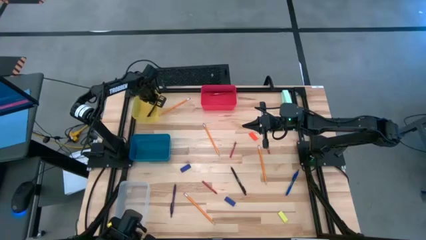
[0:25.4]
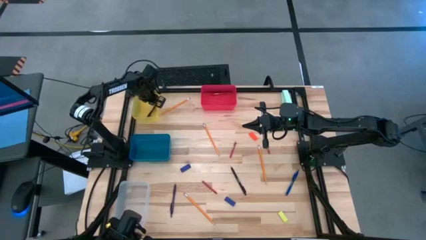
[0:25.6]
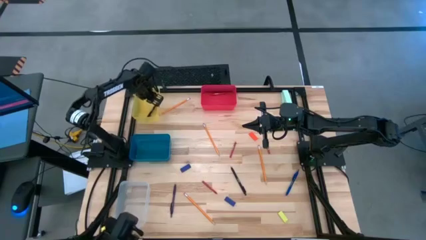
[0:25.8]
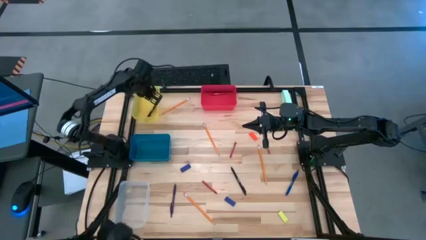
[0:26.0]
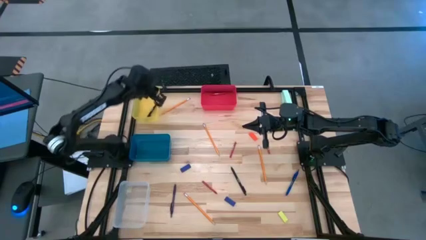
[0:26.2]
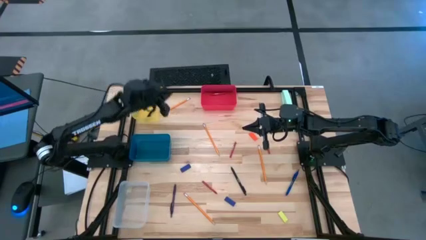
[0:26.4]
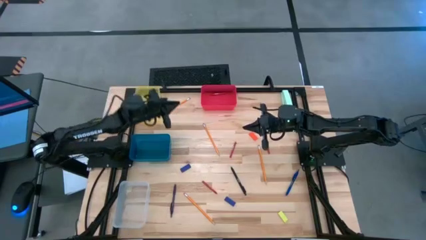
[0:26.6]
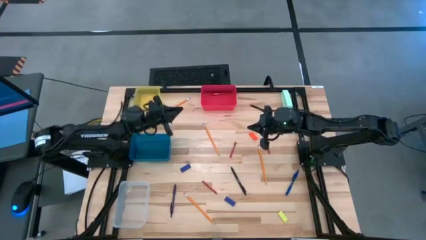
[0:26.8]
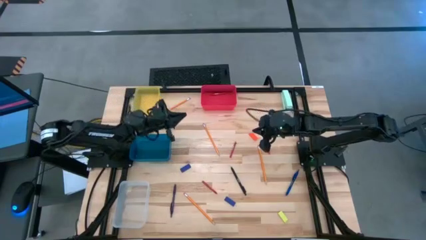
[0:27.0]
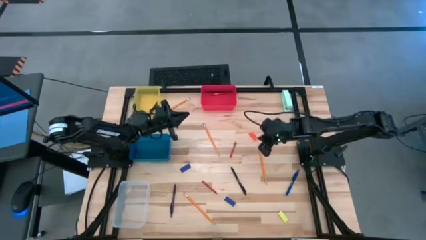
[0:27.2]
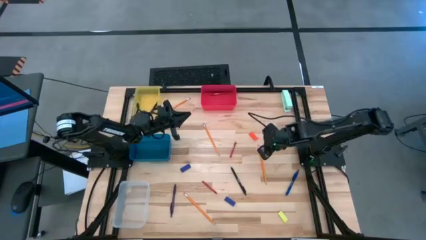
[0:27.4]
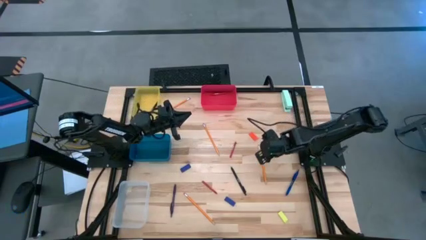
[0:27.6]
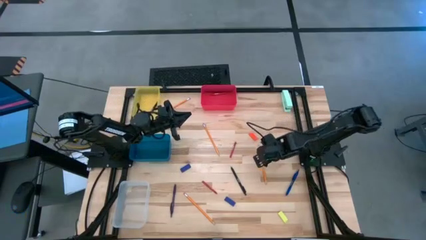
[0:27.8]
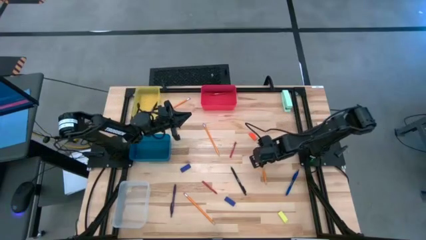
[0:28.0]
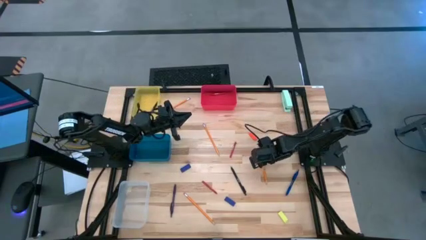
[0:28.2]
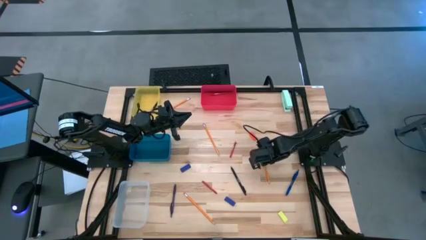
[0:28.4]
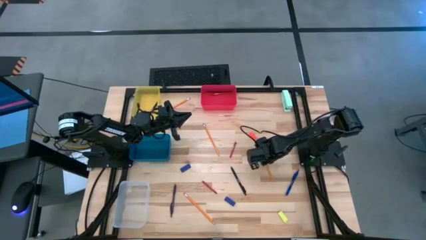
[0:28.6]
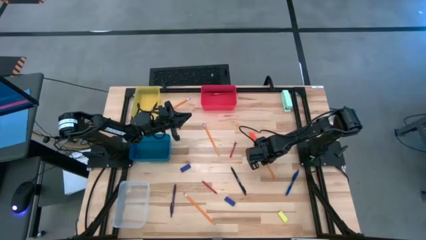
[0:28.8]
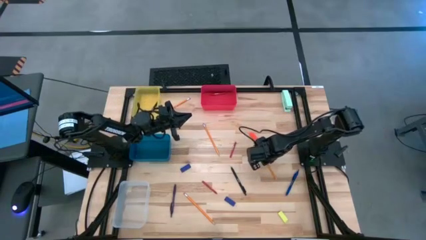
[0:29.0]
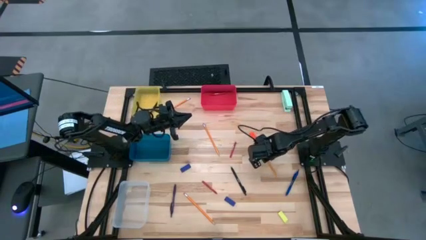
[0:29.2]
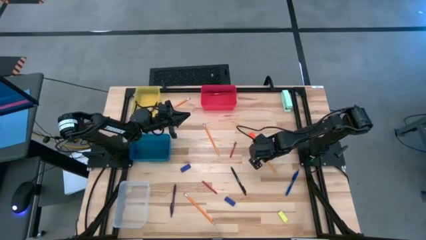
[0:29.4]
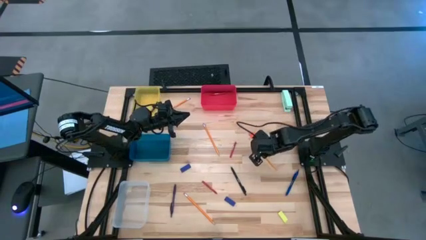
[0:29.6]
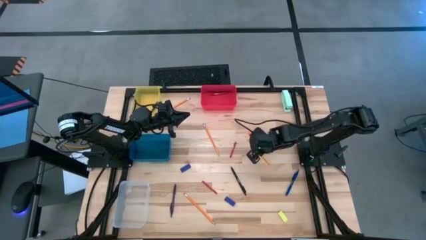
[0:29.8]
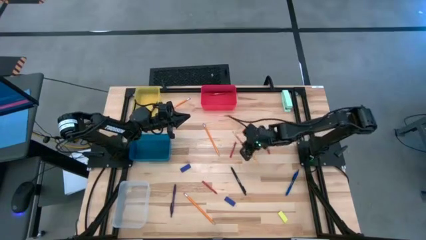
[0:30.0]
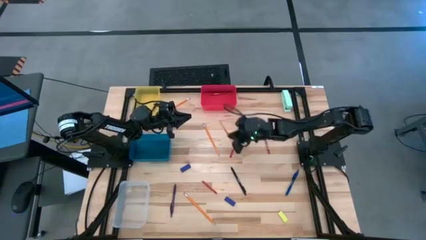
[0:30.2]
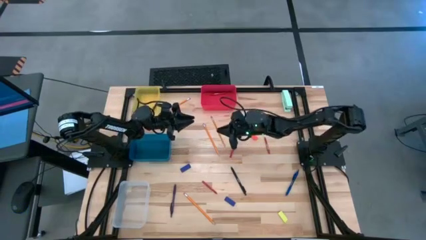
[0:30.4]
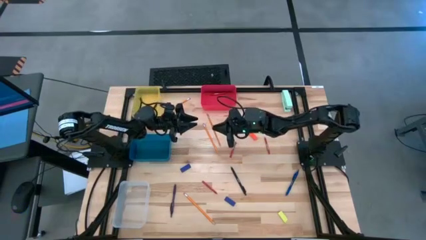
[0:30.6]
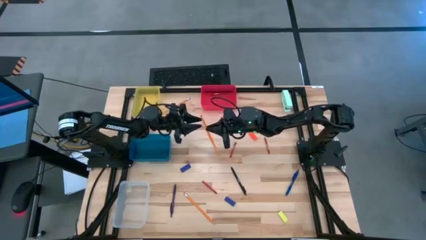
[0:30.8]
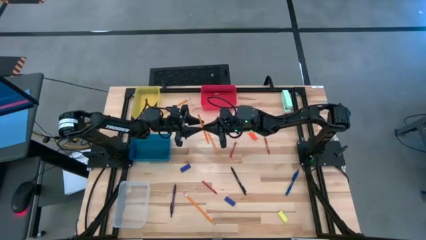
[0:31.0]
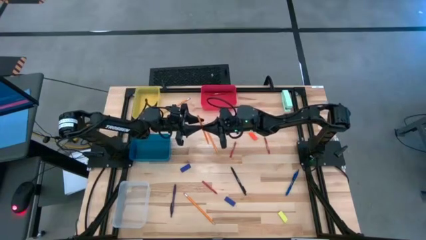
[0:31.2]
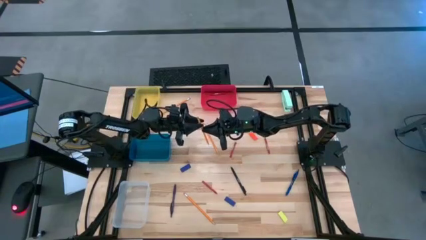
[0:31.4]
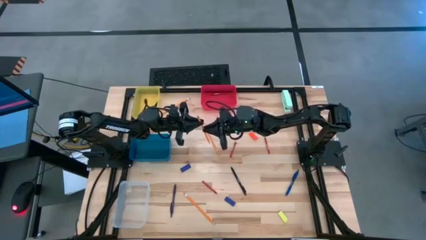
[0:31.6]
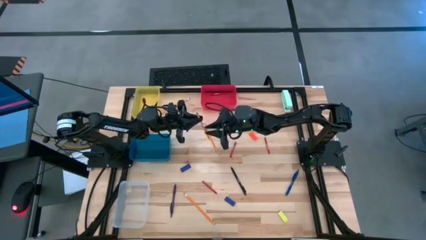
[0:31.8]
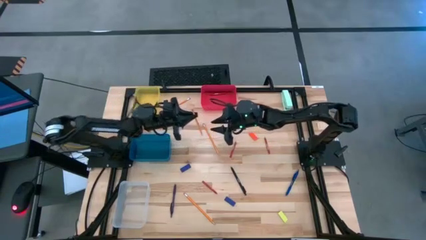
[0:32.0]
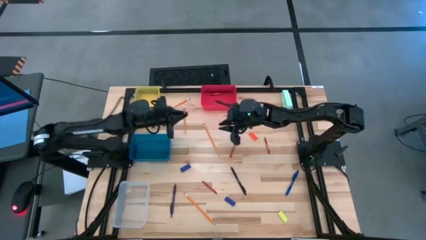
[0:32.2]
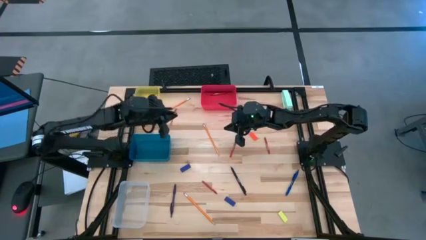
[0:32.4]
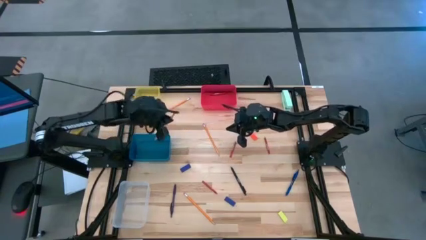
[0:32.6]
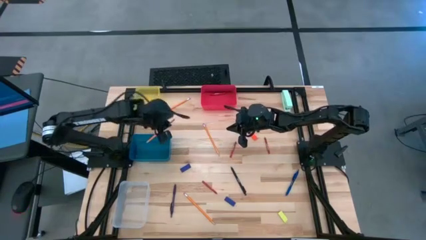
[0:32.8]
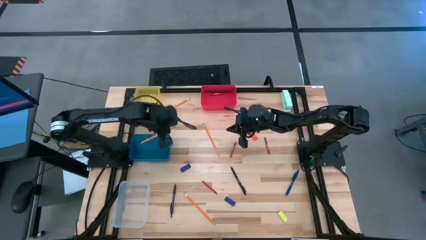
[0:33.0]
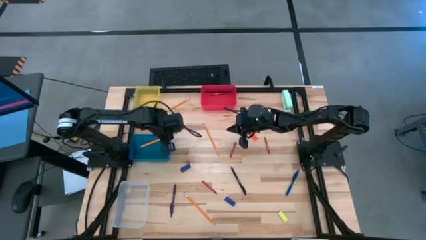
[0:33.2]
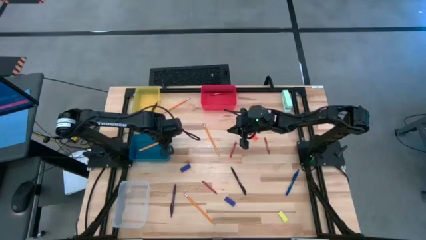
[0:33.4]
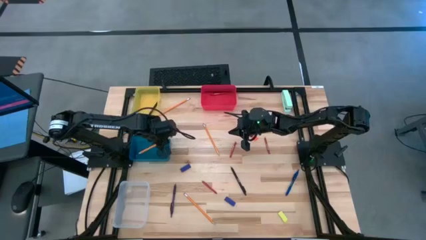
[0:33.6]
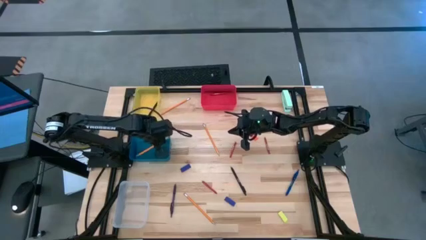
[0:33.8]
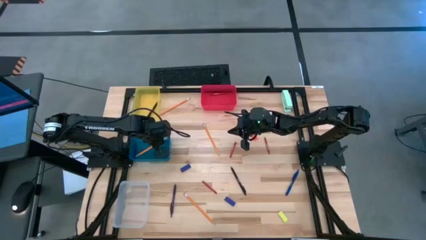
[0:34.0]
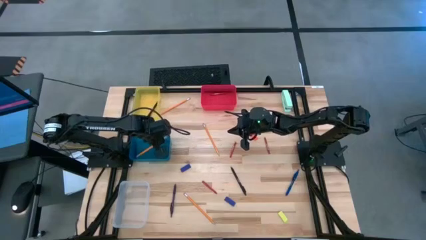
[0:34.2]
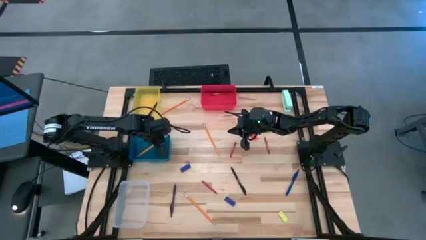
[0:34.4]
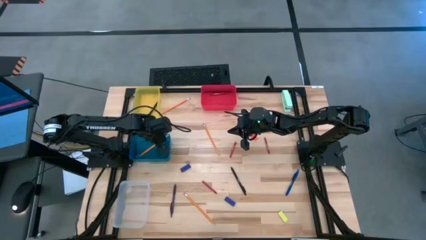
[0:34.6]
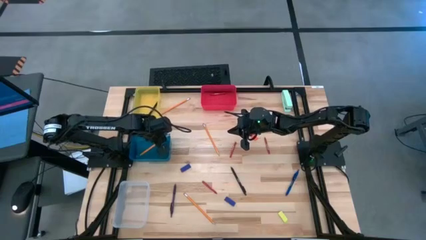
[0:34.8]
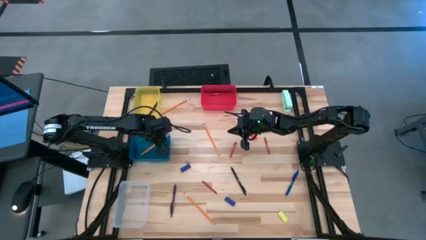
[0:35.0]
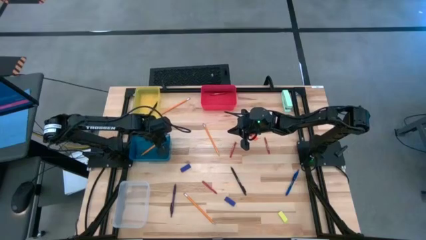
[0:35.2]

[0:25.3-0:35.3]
Task: Sort crayons/erasers/pens/pencils in bins
Put the pencil into the blue bin
